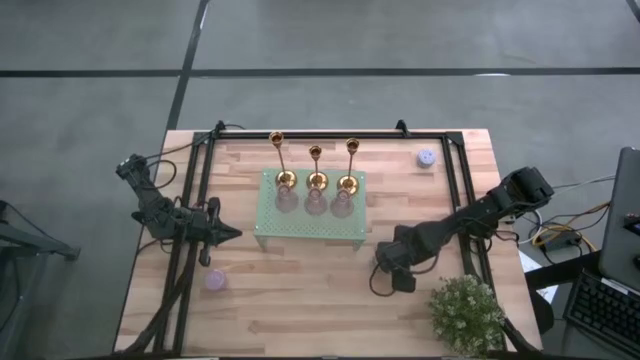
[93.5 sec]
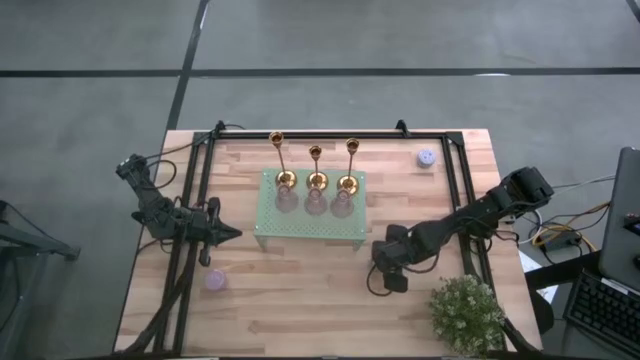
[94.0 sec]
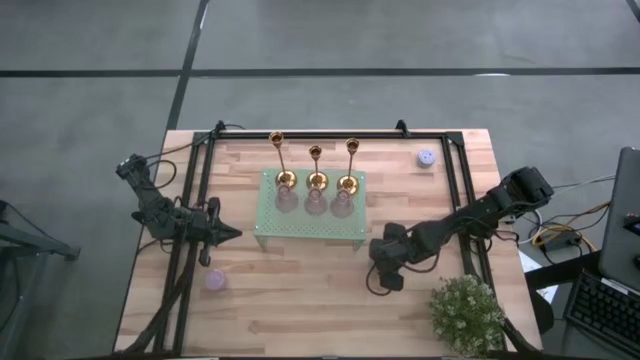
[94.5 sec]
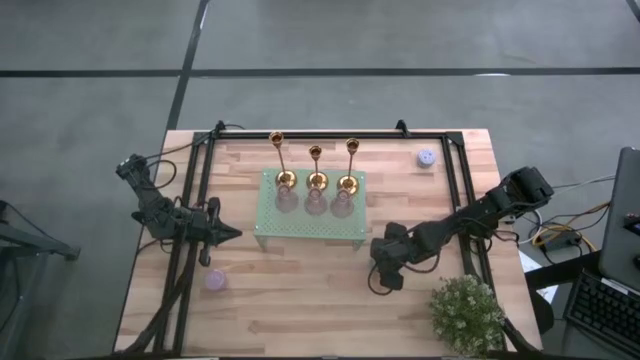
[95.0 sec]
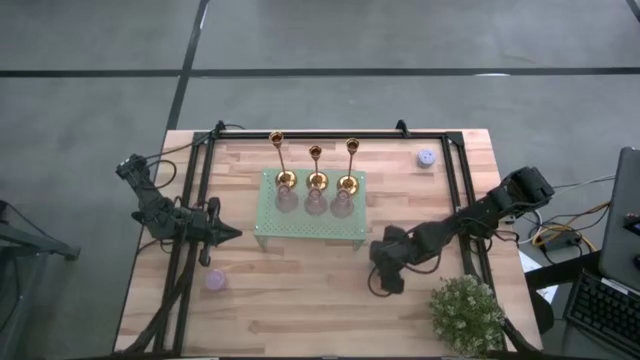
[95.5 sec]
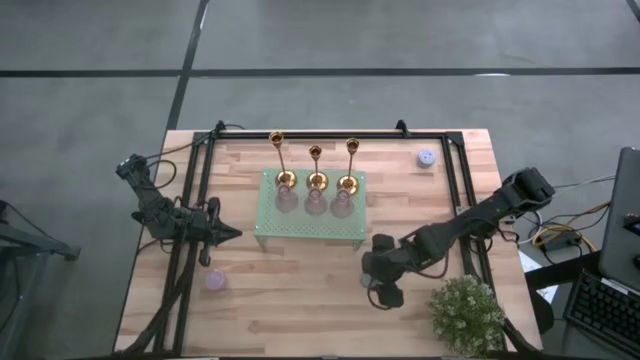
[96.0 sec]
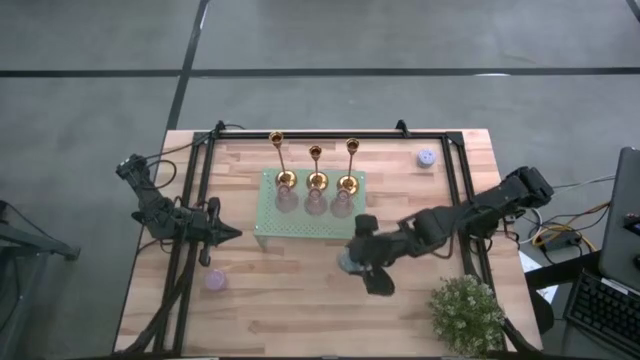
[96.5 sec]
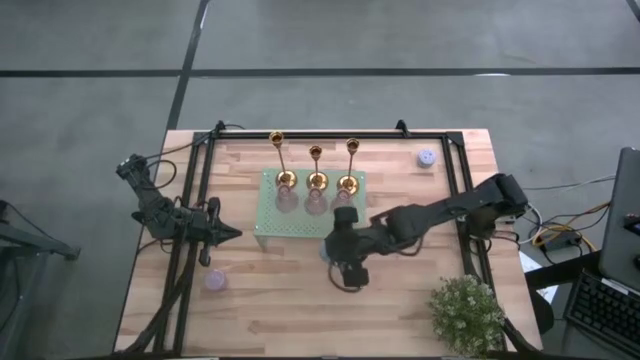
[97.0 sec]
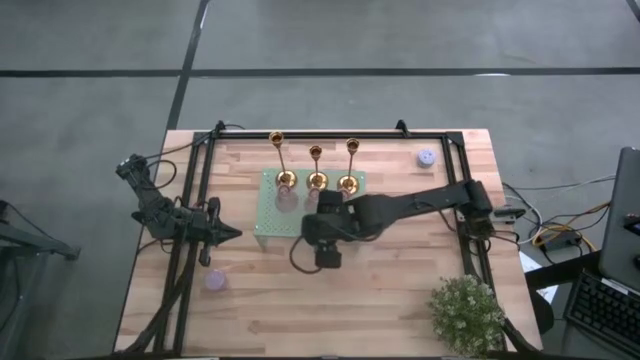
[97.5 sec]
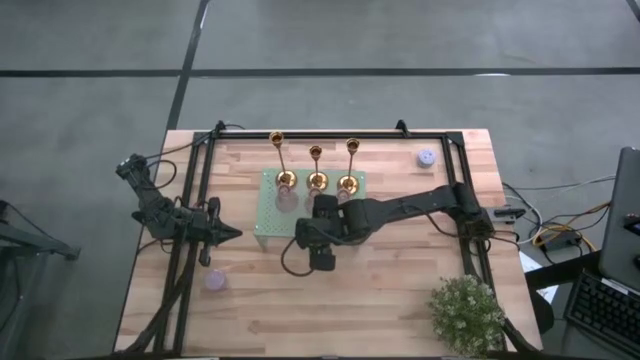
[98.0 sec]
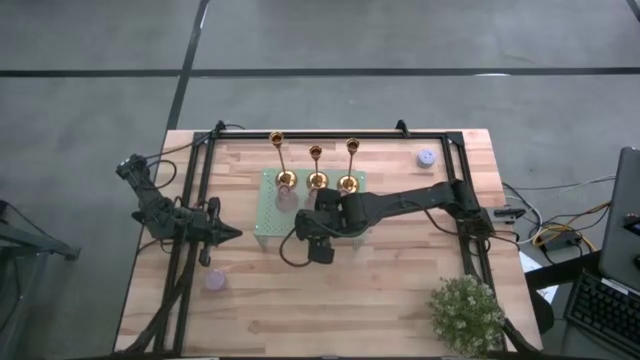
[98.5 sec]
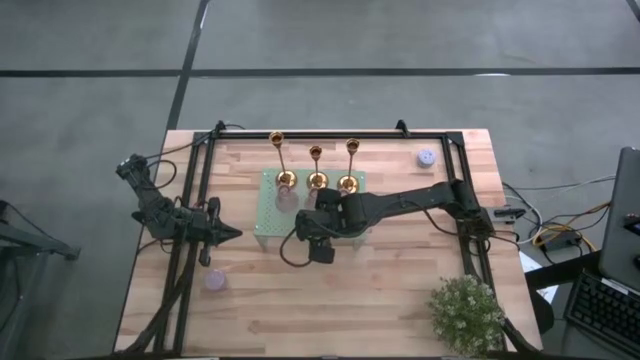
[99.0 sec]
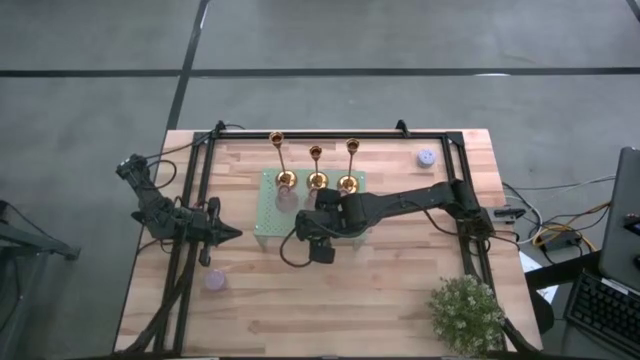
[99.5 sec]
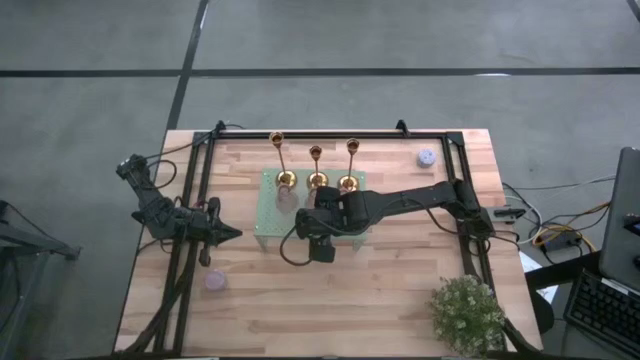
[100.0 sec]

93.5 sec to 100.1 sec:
Task: Pick & Place candle stick holders
Put the blue scented candle on the shelf

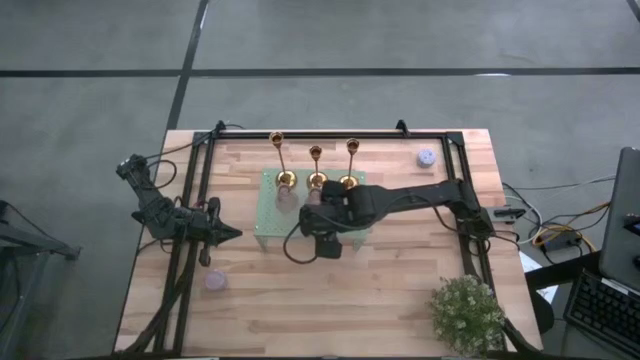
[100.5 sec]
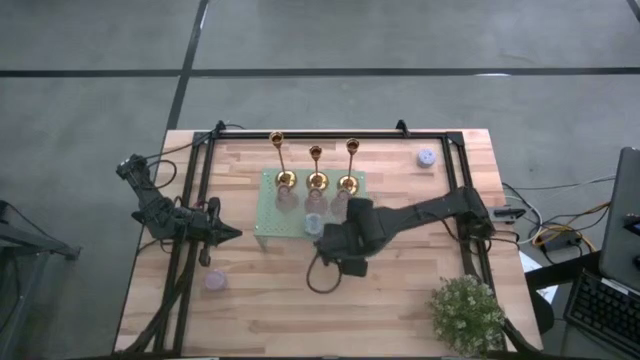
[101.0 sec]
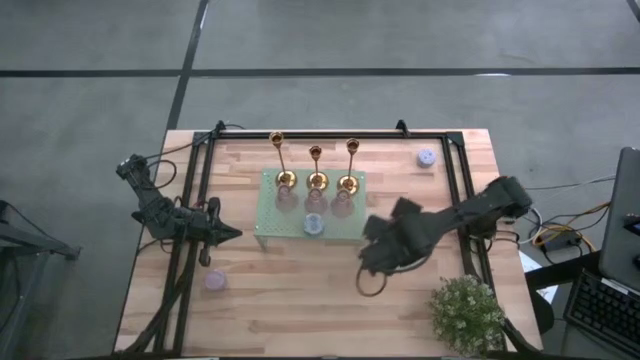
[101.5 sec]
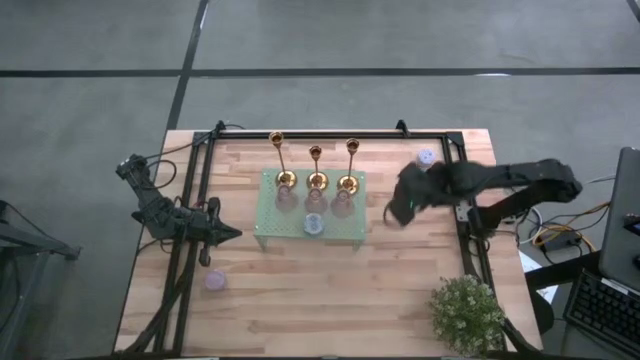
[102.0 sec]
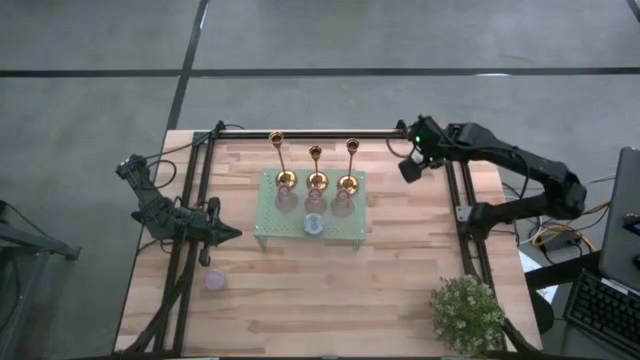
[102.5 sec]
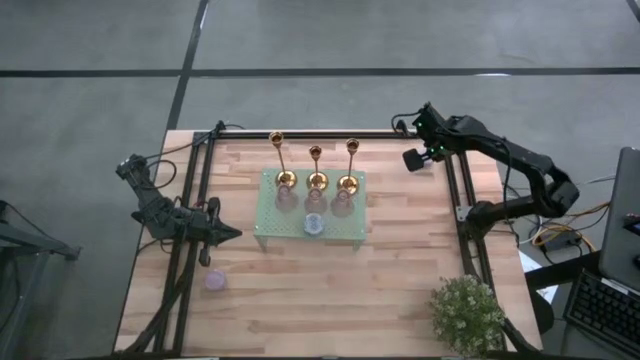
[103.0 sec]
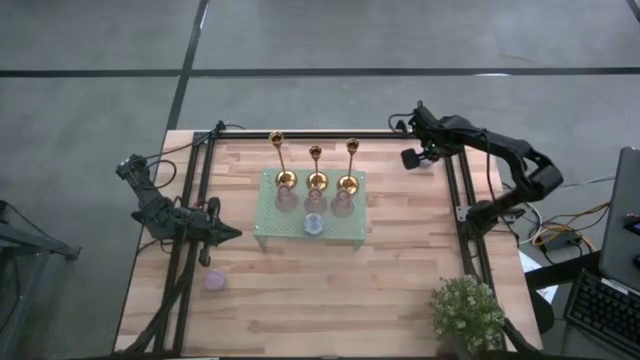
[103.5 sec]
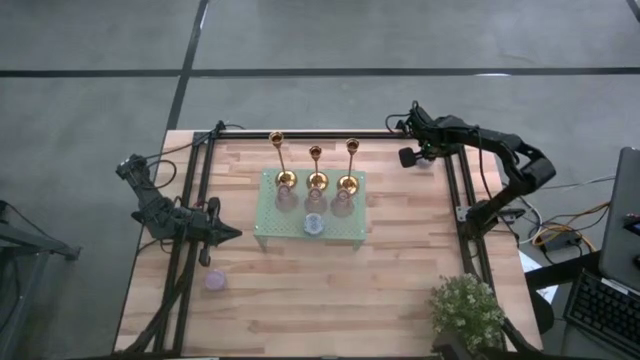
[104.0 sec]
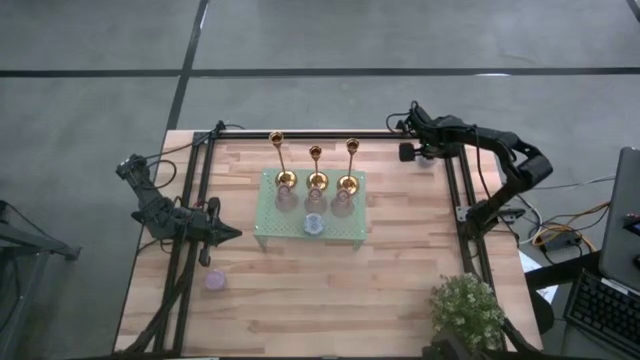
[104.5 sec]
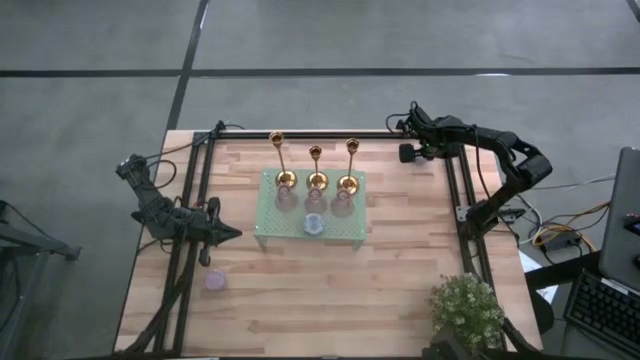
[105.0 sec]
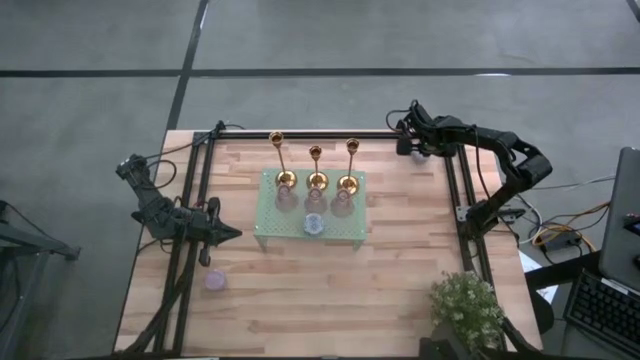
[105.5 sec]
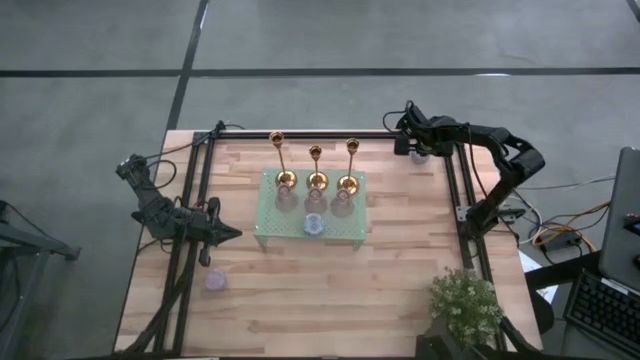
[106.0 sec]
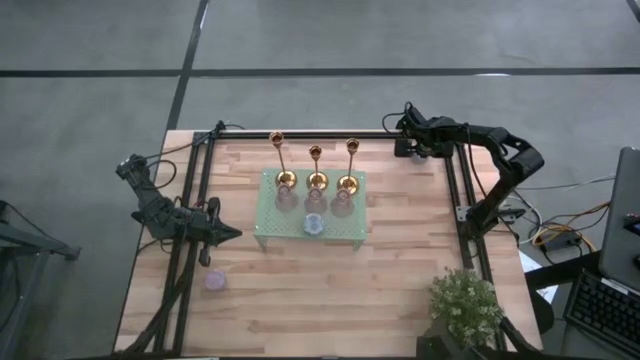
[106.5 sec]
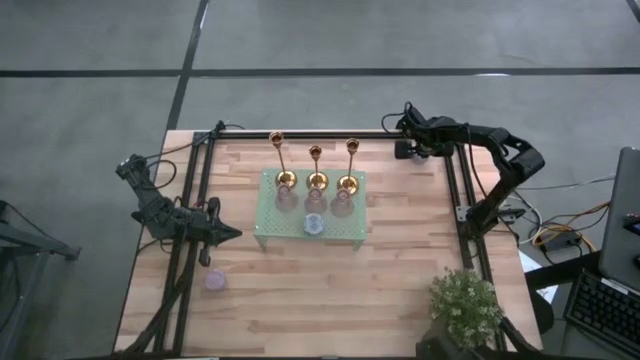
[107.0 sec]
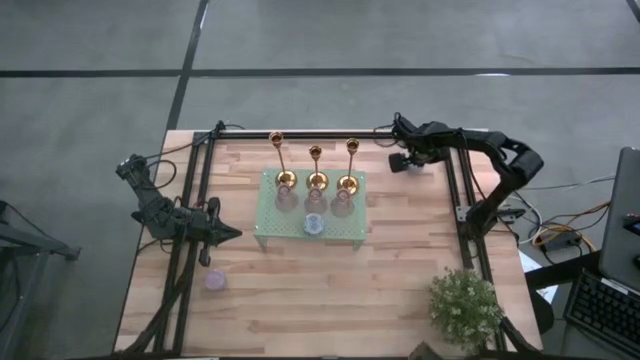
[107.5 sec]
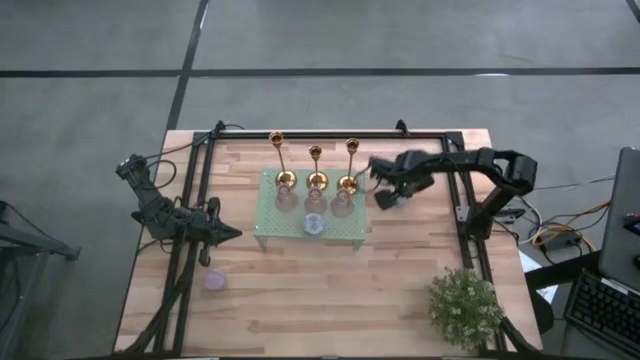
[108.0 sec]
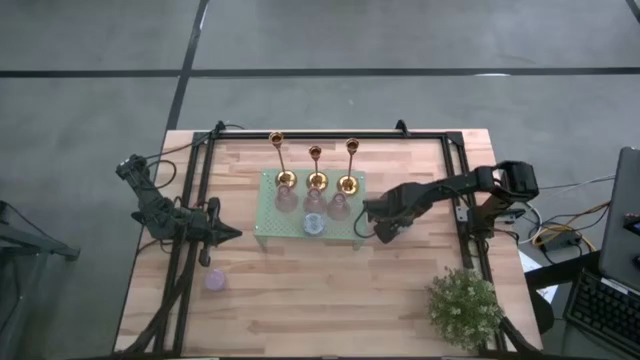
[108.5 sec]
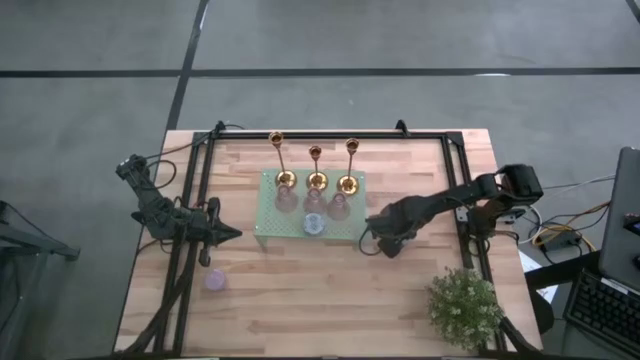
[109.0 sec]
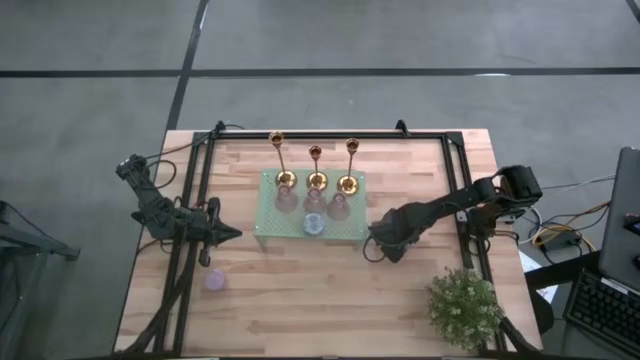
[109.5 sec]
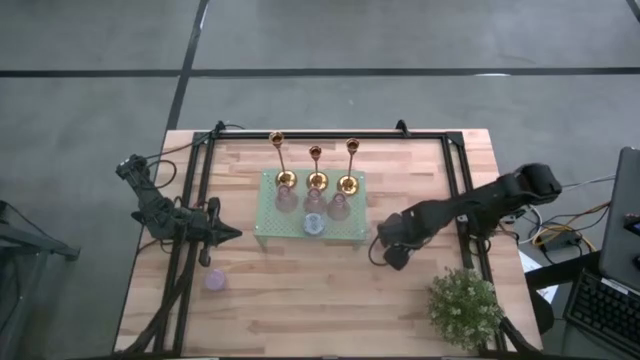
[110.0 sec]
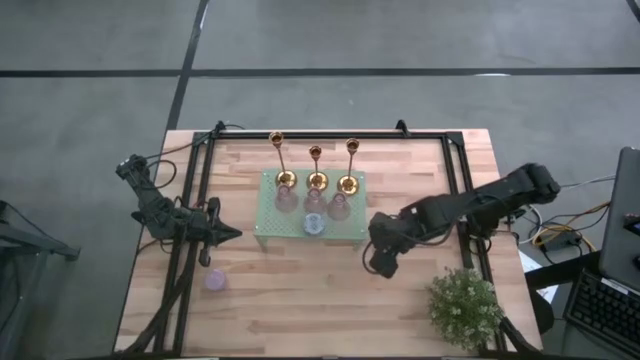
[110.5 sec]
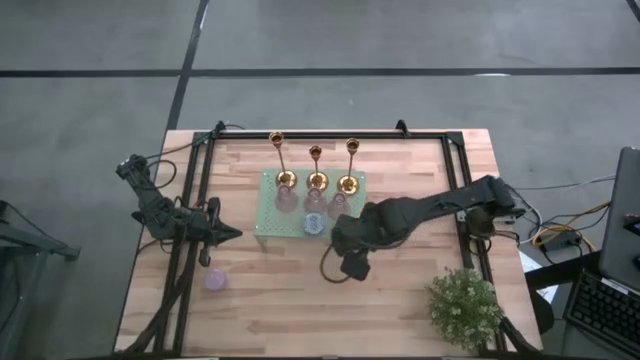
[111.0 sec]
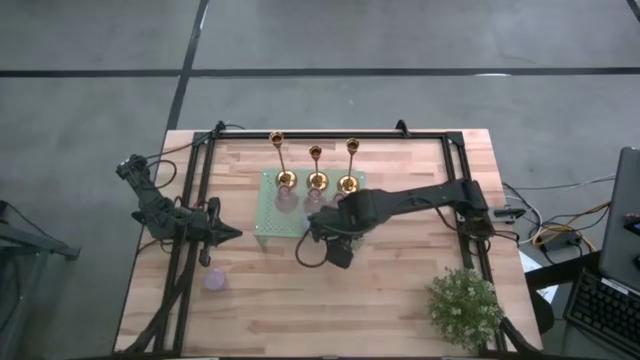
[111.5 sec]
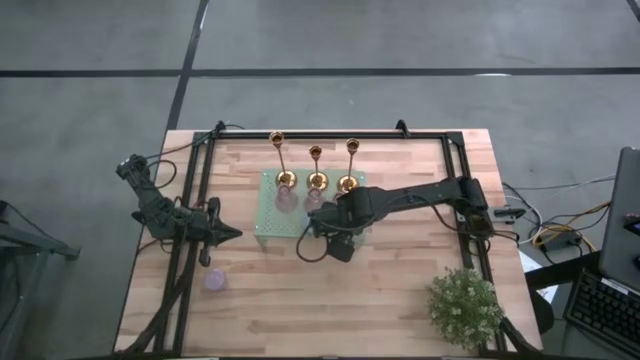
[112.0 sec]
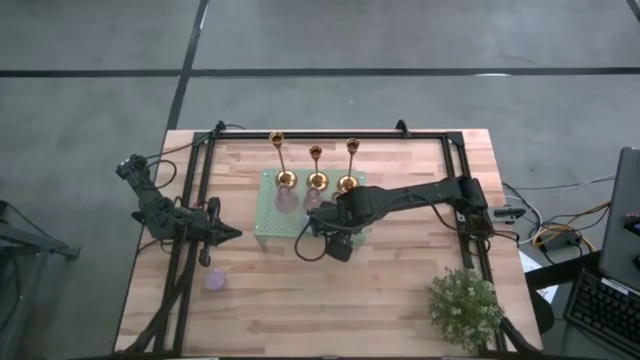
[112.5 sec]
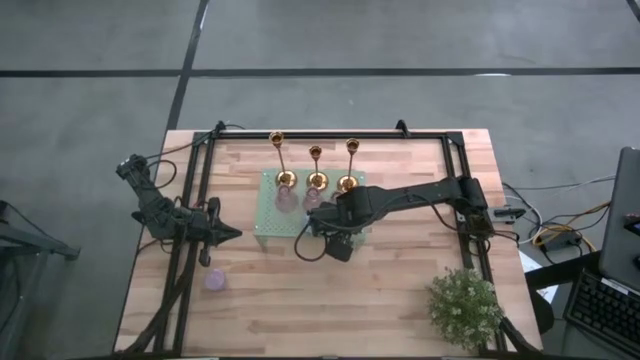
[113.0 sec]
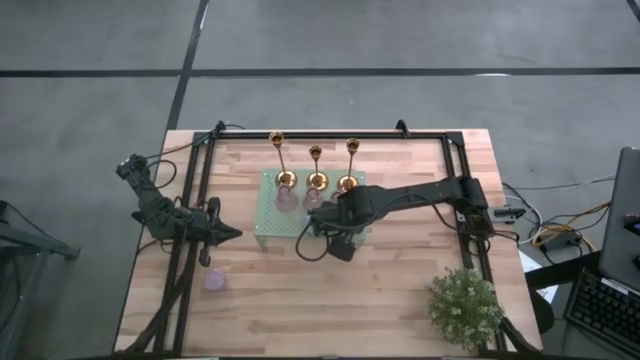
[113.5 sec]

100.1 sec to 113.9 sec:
Put the red scented candle on the shelf aligned with the other scented candle
